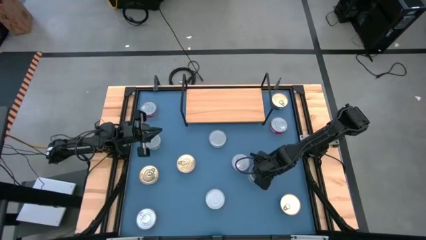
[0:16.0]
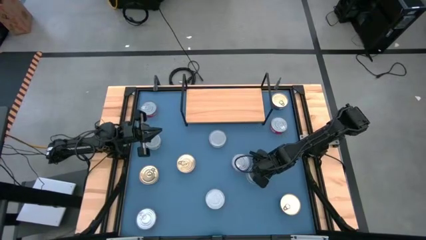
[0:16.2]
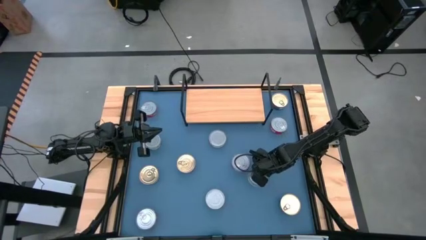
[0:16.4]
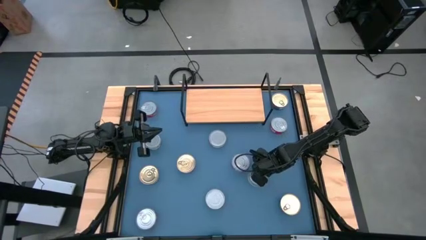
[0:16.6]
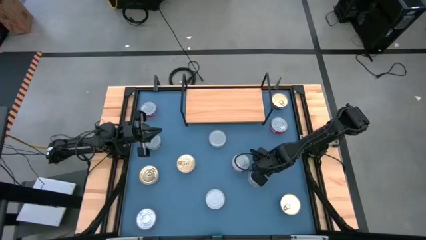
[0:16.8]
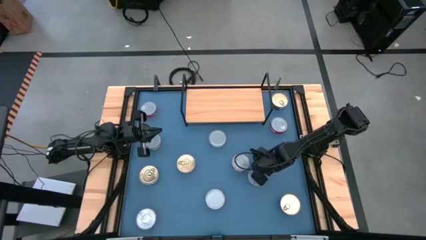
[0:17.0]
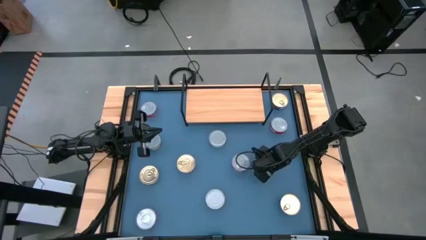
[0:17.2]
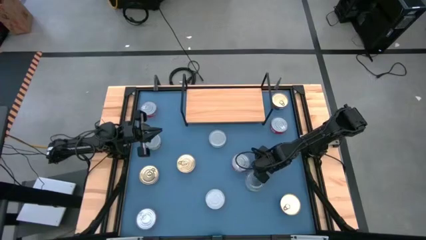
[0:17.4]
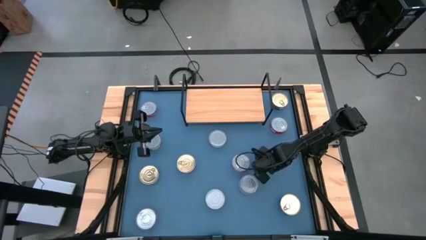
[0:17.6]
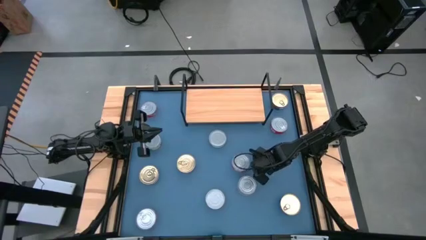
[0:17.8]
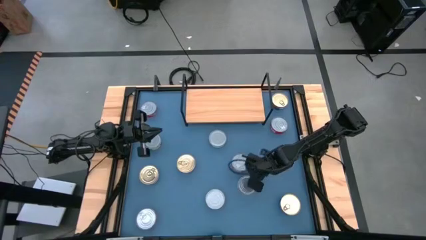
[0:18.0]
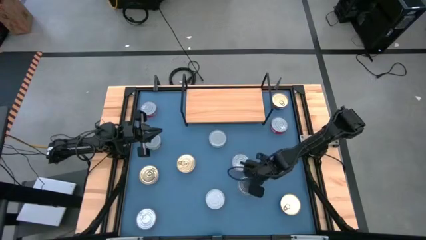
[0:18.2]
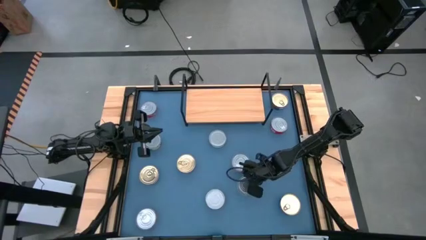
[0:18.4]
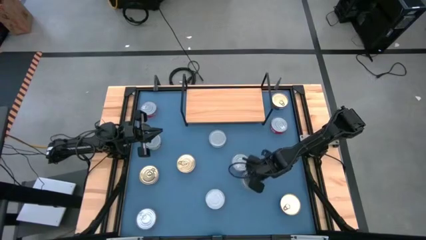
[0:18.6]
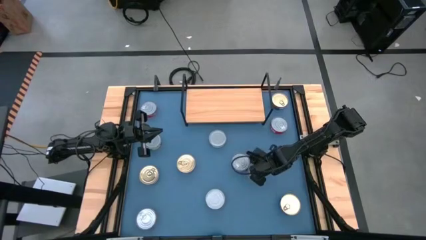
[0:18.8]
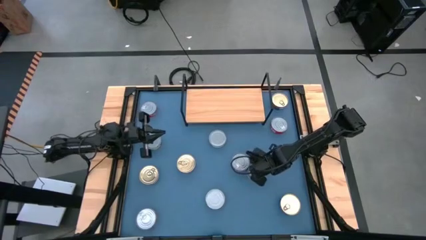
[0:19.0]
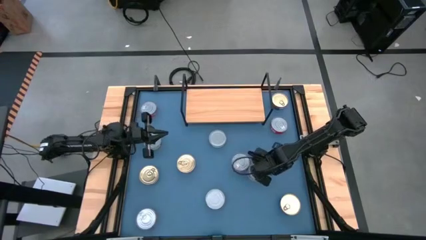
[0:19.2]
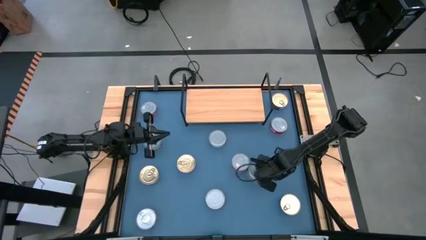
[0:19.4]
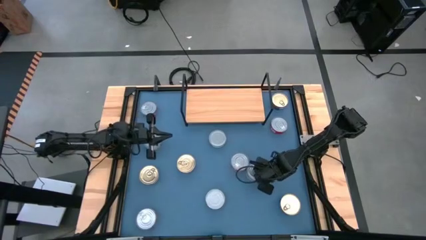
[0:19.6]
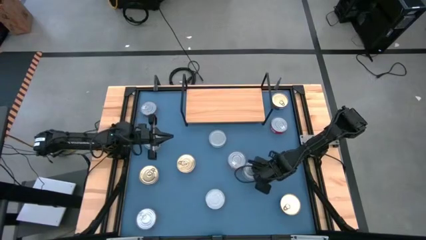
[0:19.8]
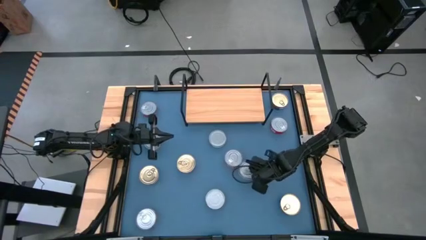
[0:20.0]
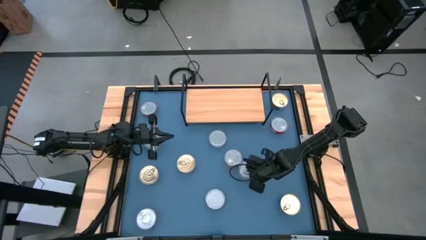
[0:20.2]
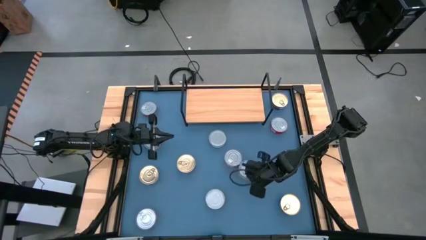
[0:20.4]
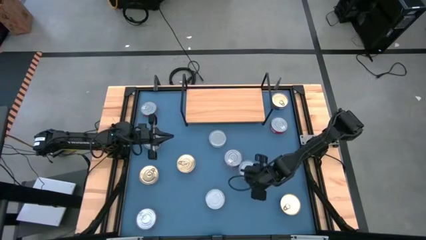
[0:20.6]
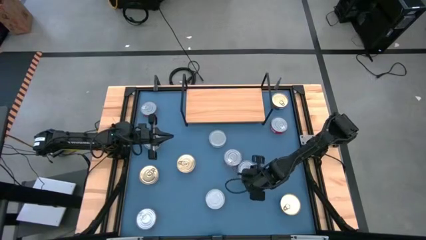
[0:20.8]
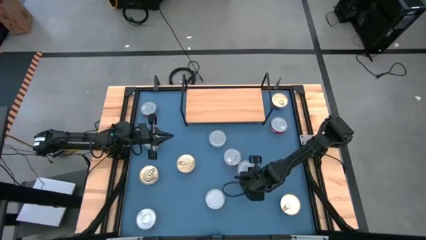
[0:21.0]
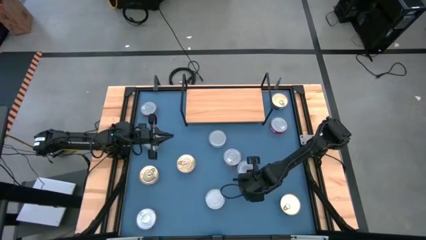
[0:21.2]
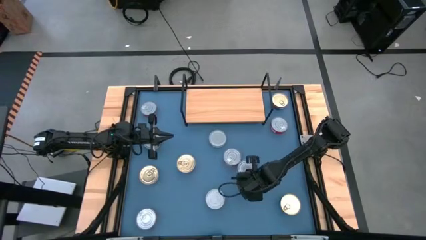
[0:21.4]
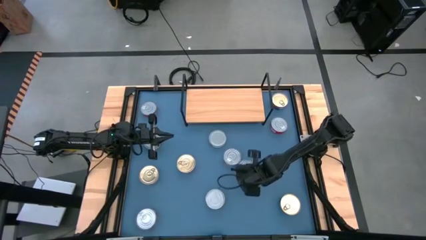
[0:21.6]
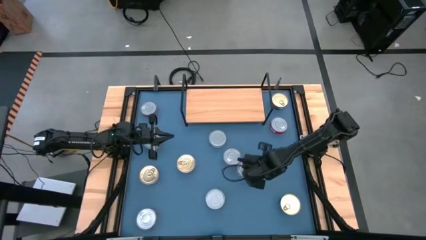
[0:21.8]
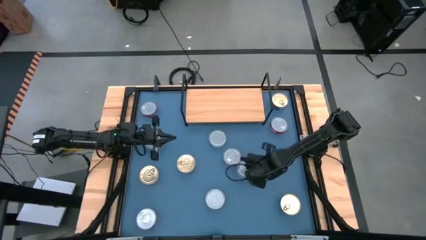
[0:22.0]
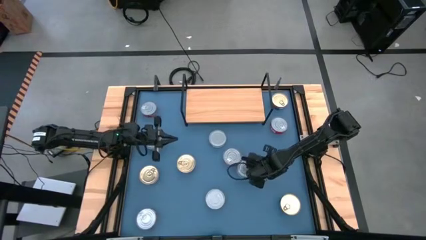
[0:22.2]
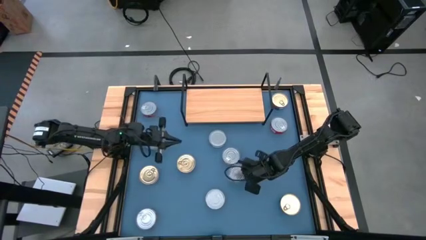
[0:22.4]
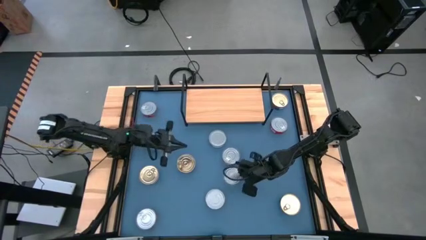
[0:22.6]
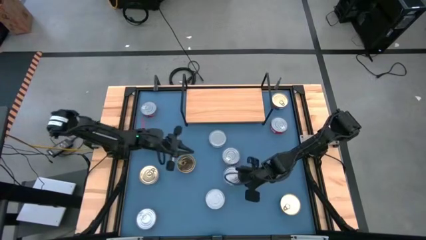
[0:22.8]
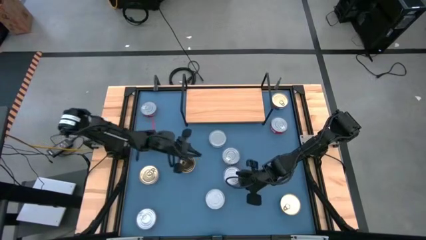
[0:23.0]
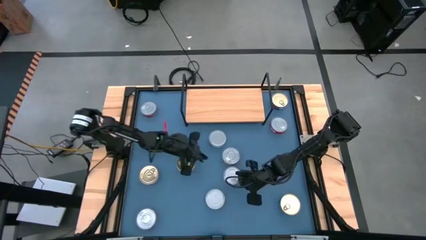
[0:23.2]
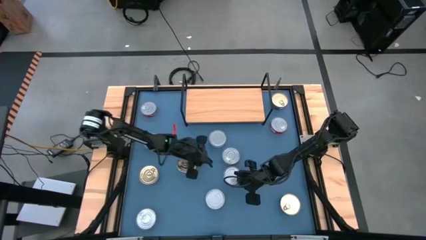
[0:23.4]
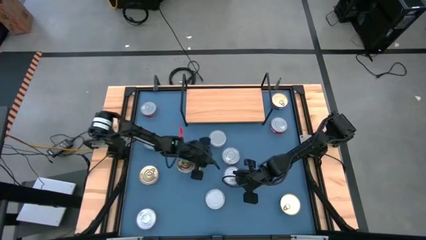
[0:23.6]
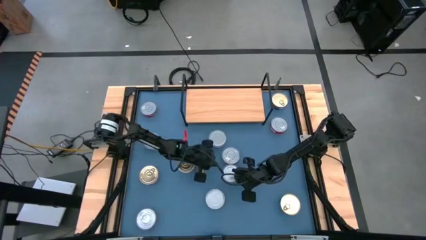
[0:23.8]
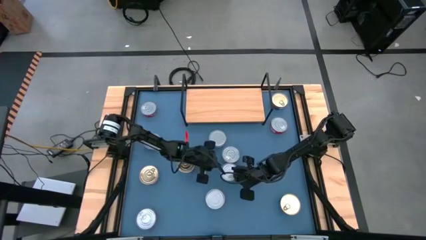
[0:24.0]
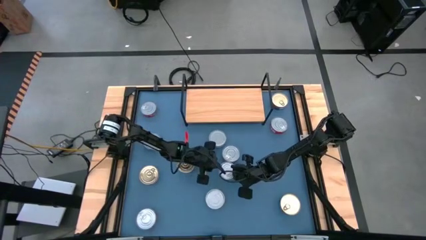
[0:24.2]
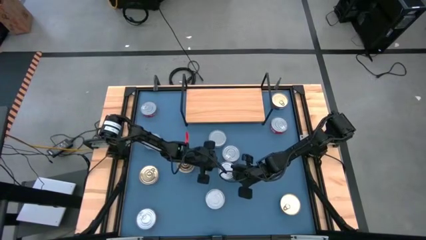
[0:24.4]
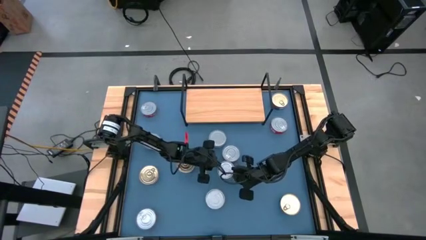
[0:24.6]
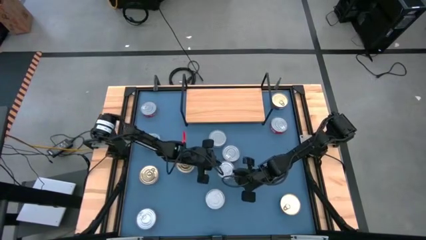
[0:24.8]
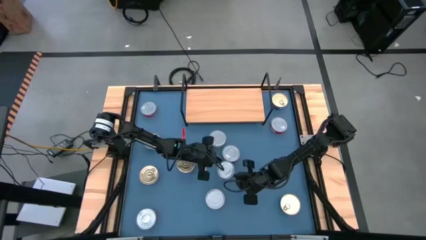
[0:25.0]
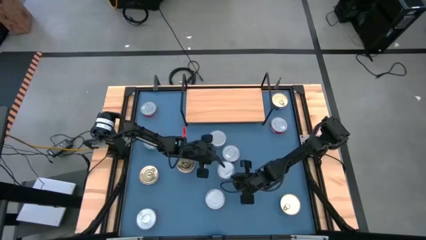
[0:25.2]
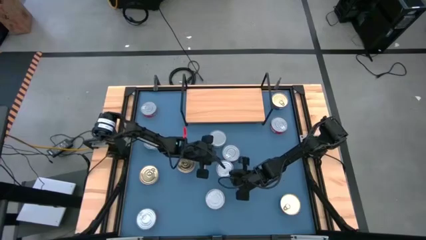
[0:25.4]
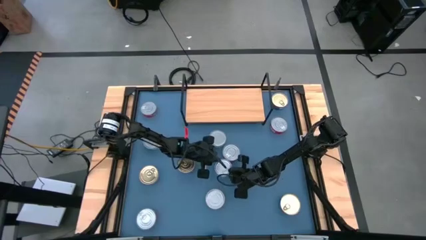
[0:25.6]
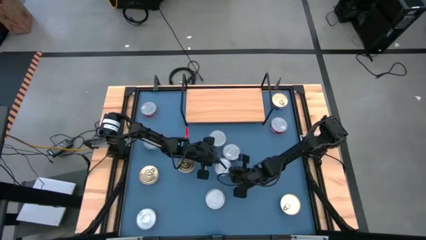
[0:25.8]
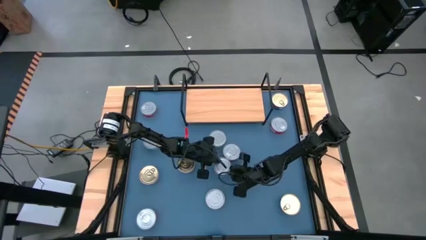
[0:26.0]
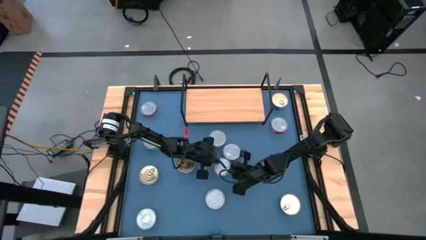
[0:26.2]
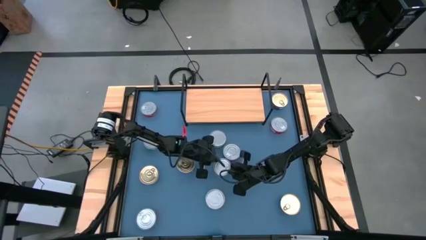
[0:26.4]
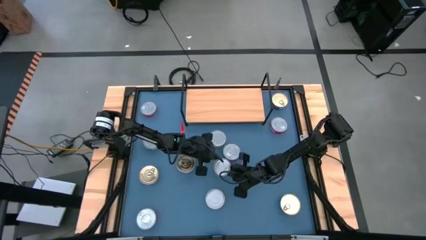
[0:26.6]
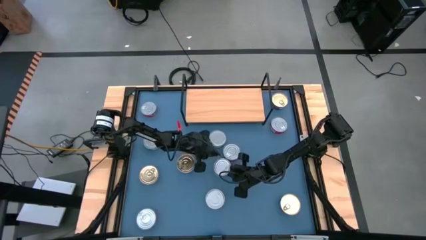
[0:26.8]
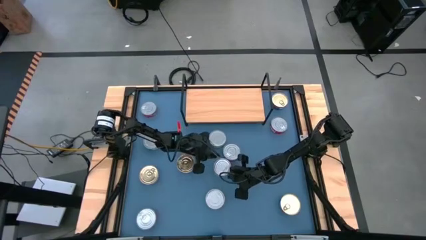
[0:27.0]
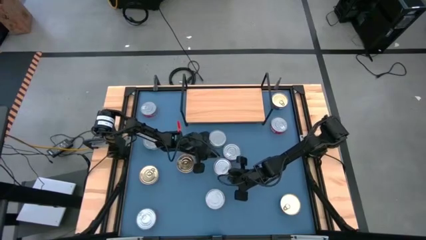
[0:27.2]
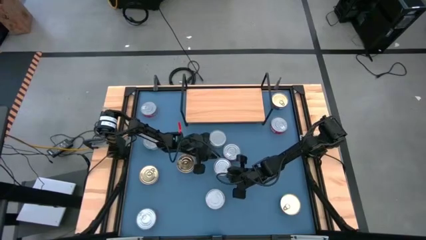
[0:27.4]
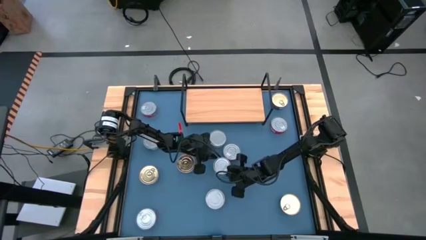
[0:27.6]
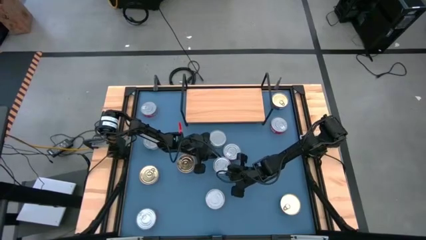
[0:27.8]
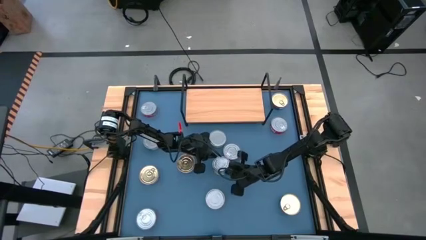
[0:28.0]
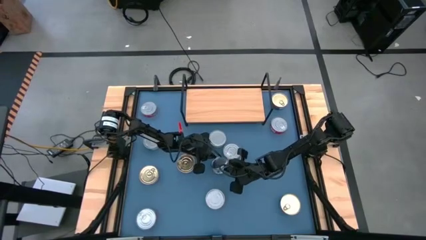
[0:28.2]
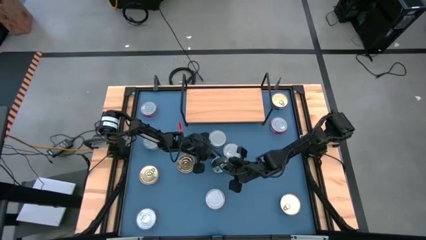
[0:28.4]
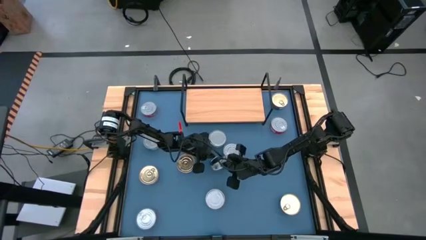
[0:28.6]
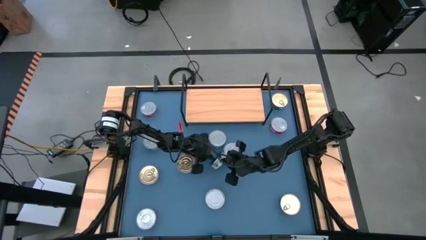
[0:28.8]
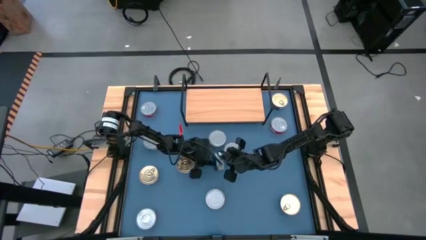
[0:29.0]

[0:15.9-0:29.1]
Task: Stack canned seafood by type on shelf
Put the green tuna can on the shelf

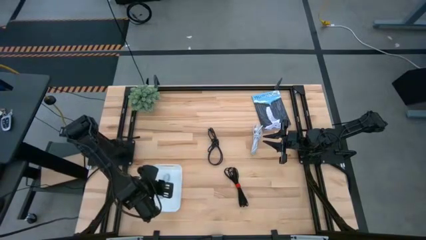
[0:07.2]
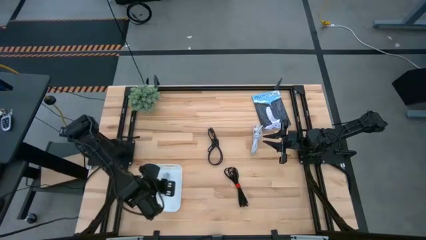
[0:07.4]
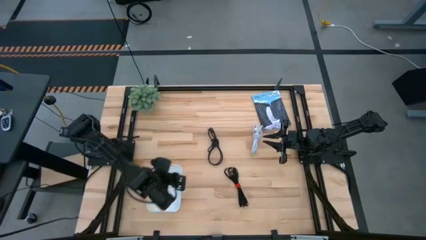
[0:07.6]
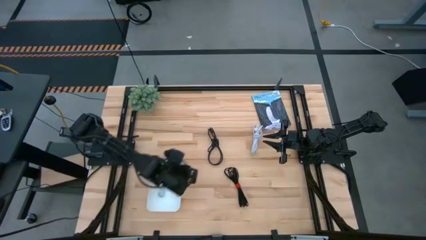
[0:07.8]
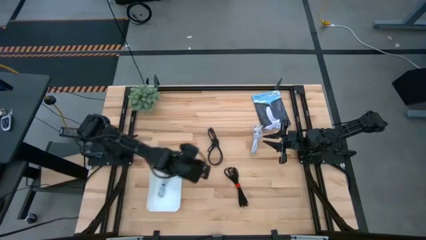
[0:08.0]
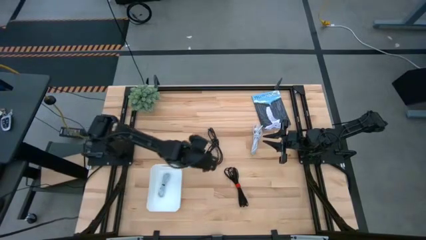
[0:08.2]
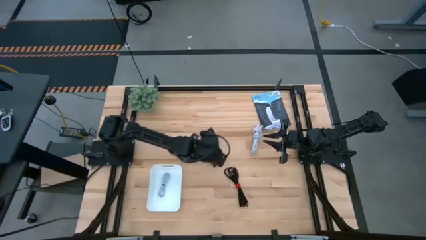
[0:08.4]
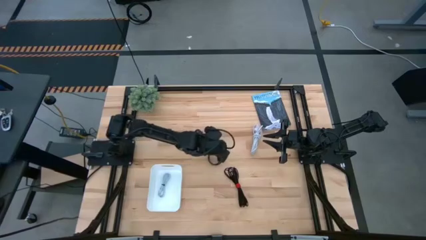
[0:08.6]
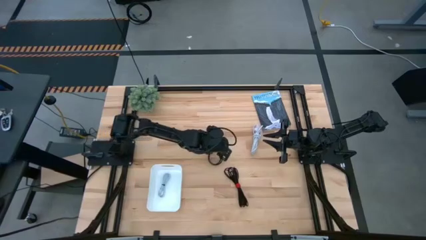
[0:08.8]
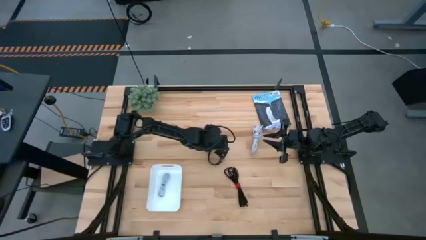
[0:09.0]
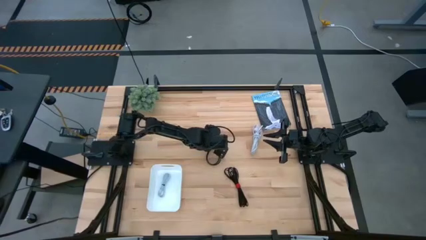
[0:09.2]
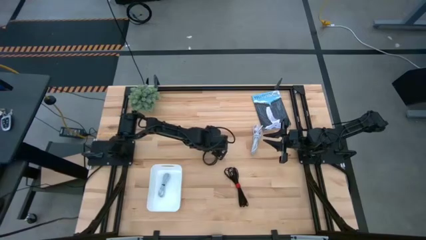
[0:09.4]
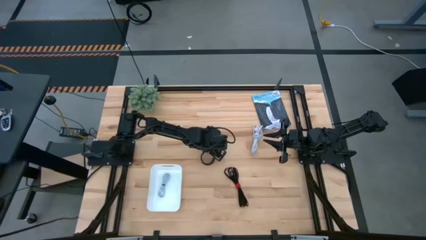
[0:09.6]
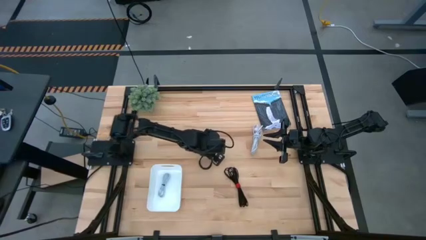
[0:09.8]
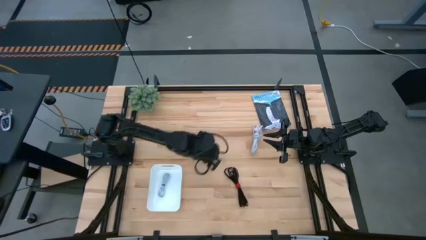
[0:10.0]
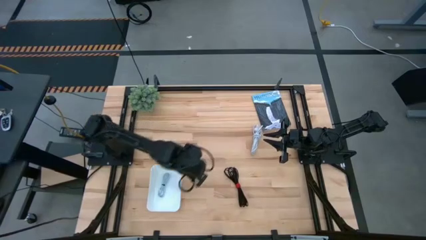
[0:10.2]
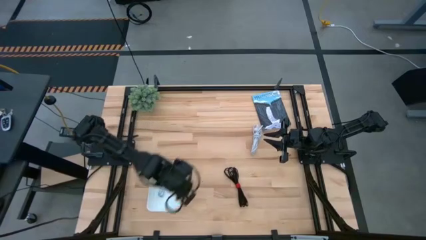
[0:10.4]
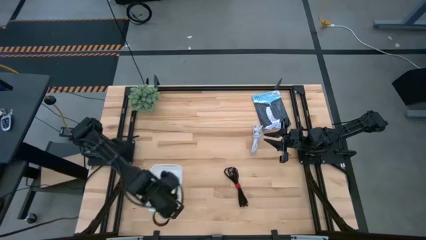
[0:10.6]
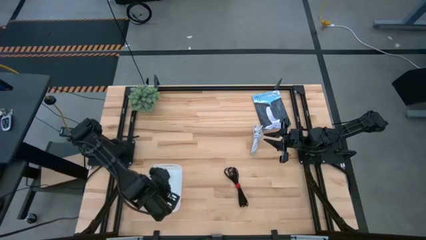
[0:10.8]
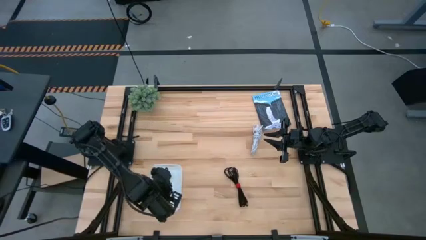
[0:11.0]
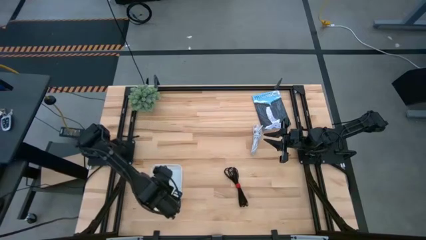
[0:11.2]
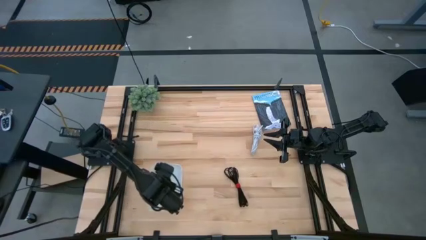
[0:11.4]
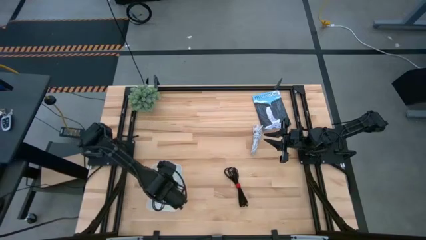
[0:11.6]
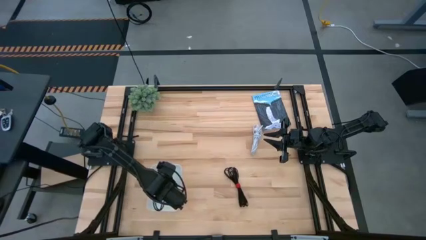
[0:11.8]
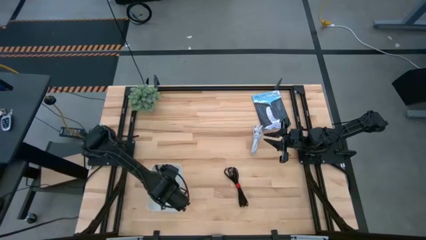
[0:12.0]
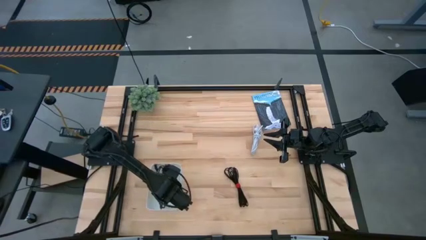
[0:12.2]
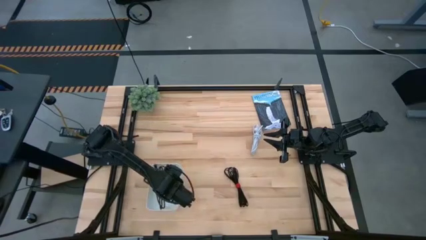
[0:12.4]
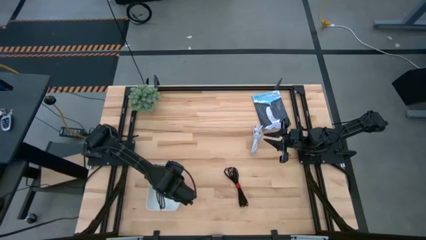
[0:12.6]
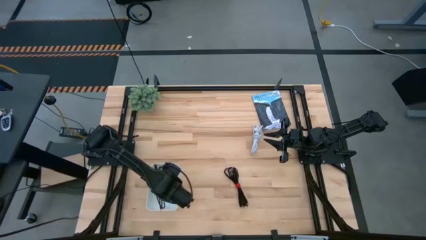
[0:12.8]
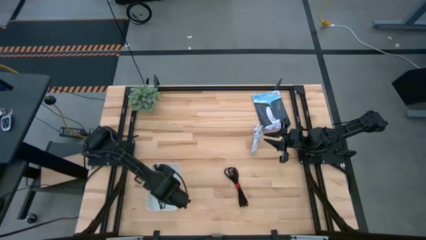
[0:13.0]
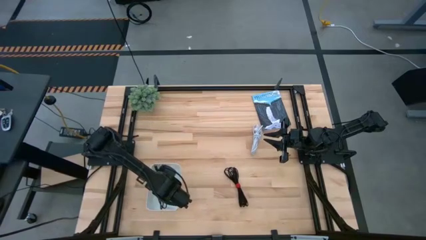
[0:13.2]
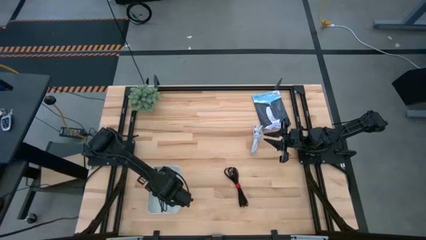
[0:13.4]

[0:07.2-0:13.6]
Task: Pick and place USB-C Cables
Put the top black USB cable into the white bin
